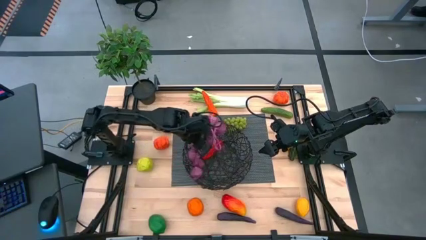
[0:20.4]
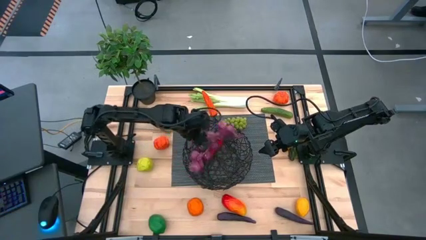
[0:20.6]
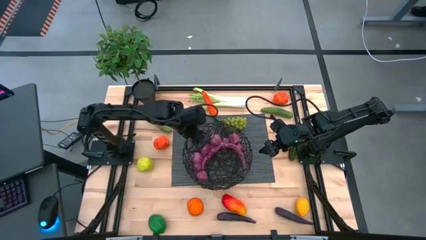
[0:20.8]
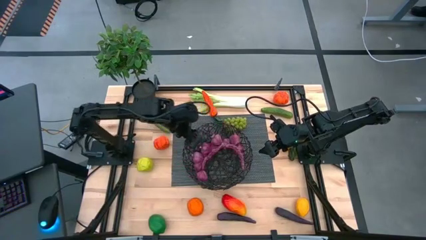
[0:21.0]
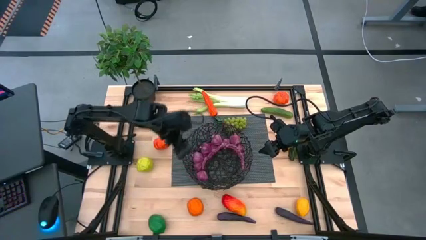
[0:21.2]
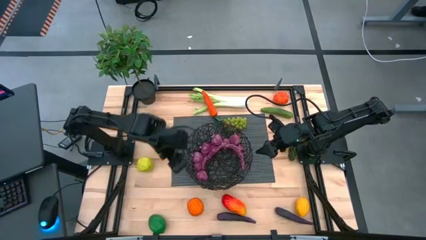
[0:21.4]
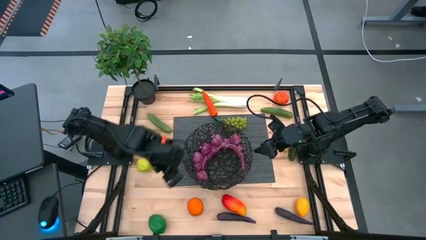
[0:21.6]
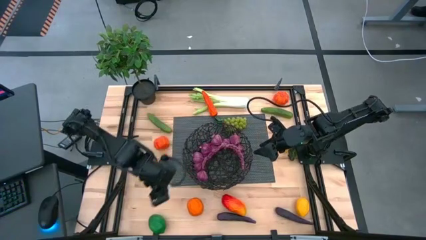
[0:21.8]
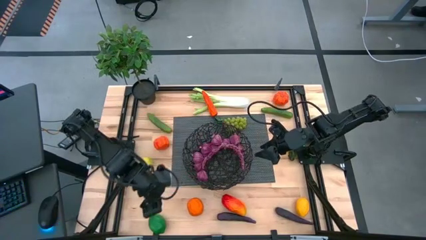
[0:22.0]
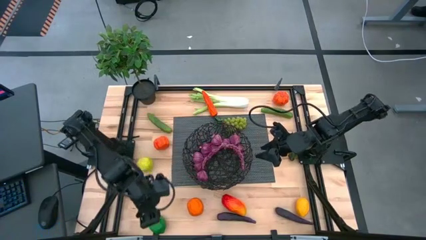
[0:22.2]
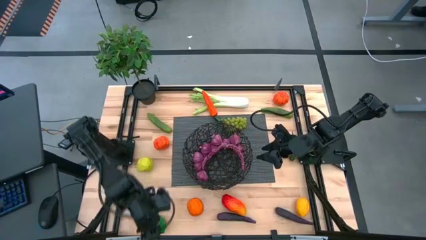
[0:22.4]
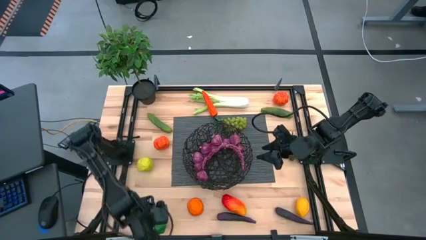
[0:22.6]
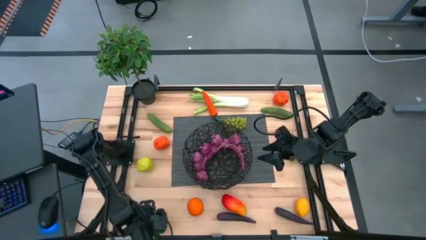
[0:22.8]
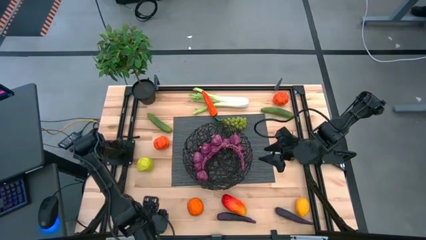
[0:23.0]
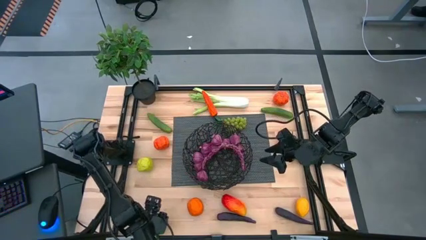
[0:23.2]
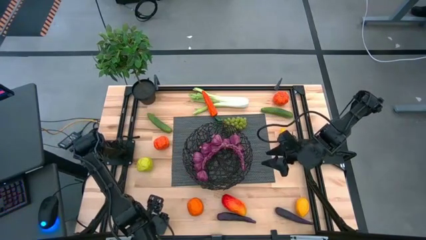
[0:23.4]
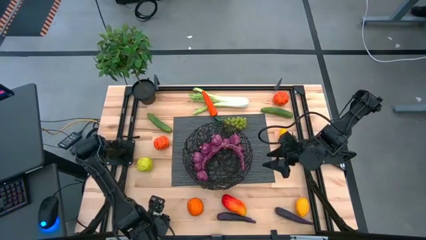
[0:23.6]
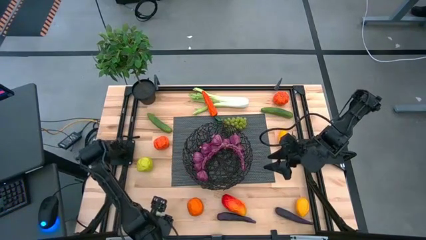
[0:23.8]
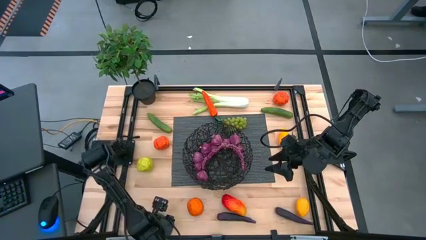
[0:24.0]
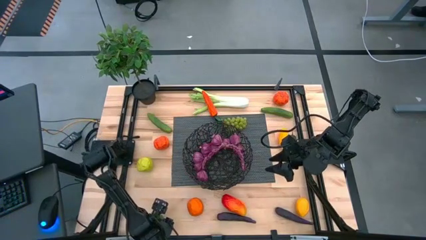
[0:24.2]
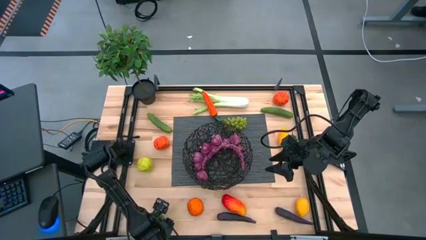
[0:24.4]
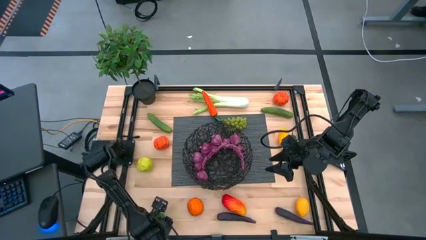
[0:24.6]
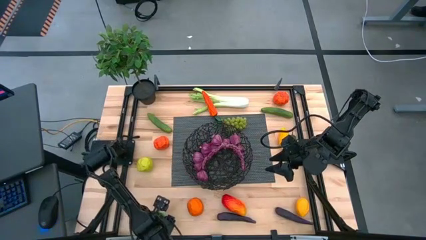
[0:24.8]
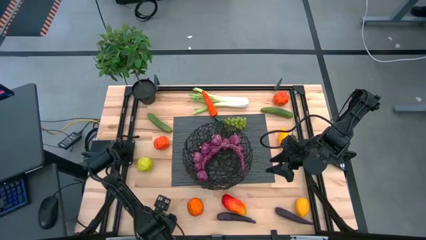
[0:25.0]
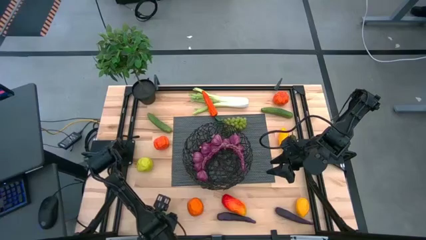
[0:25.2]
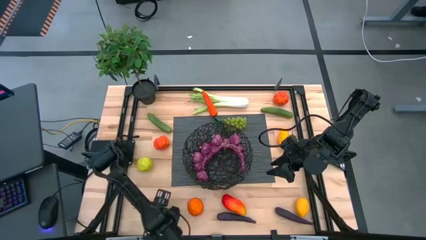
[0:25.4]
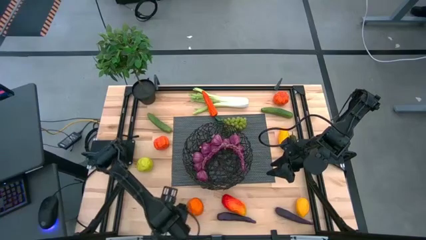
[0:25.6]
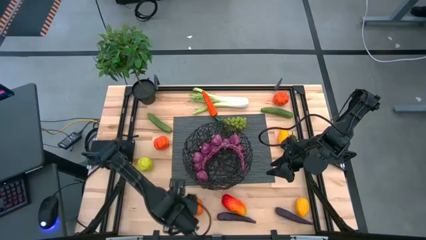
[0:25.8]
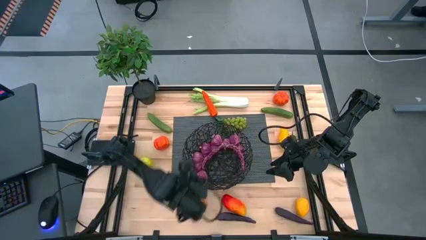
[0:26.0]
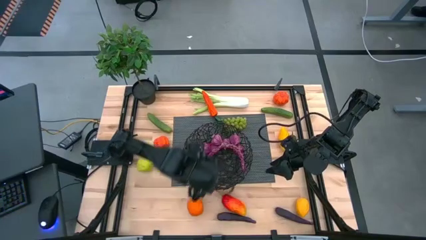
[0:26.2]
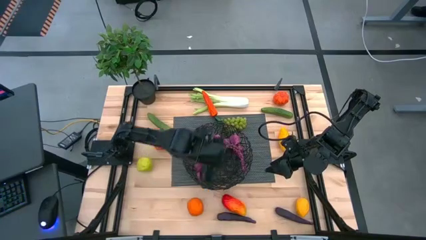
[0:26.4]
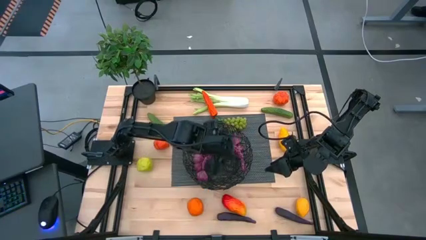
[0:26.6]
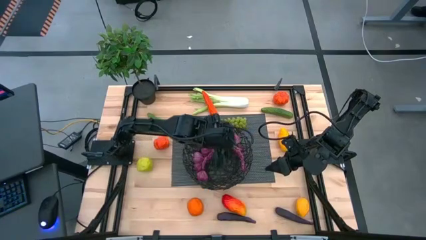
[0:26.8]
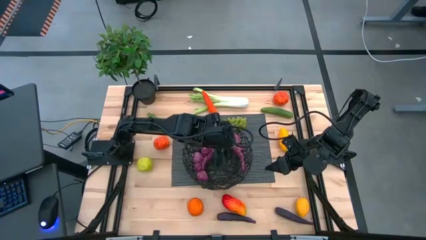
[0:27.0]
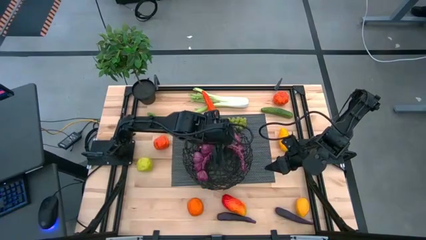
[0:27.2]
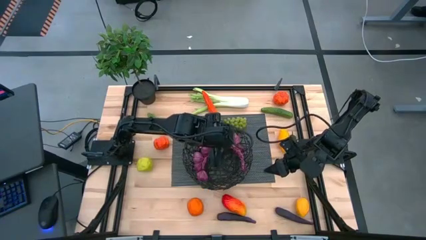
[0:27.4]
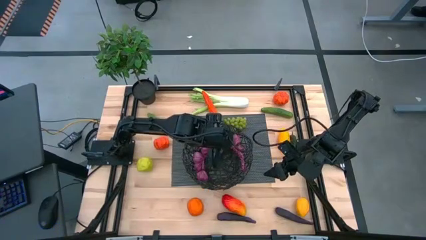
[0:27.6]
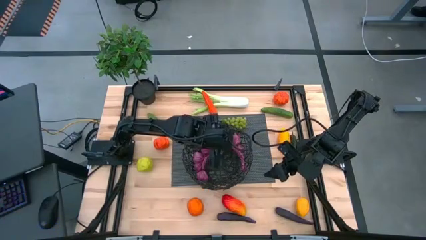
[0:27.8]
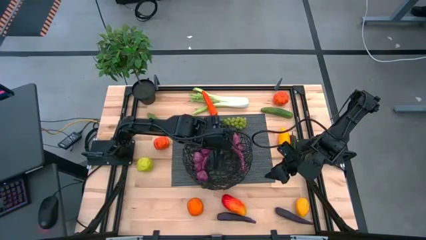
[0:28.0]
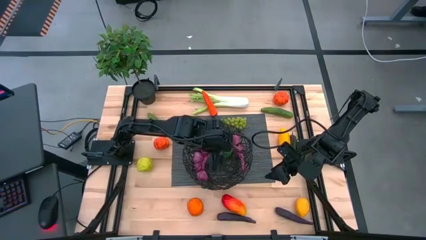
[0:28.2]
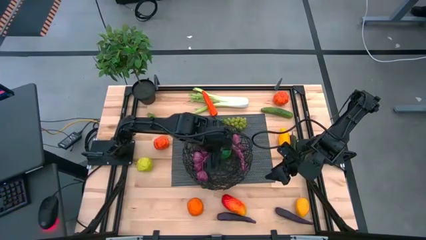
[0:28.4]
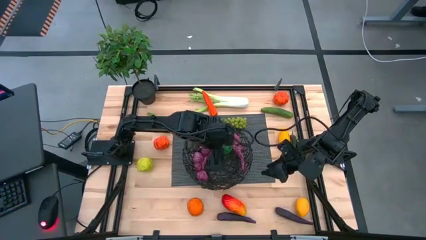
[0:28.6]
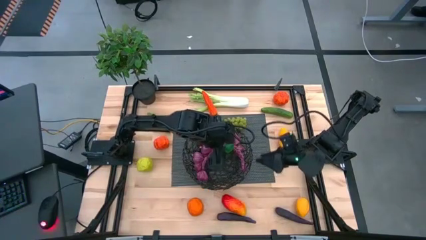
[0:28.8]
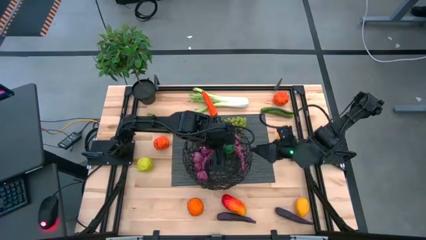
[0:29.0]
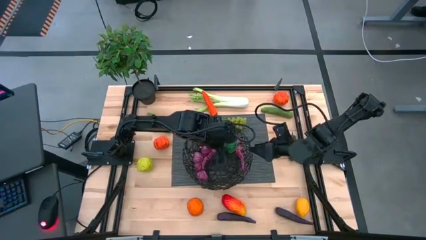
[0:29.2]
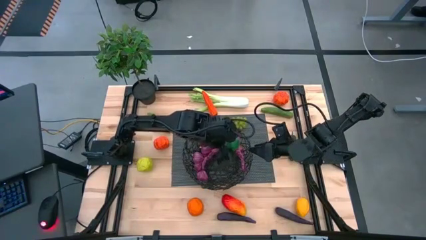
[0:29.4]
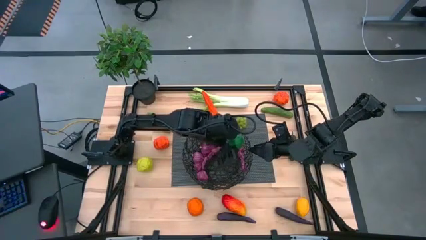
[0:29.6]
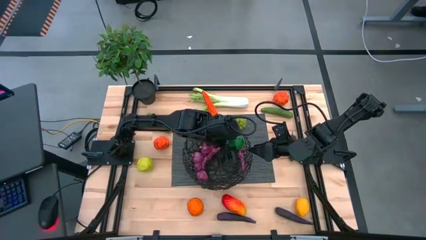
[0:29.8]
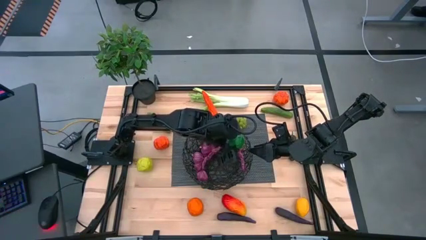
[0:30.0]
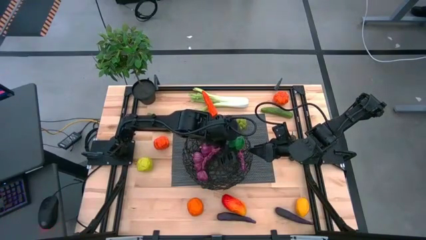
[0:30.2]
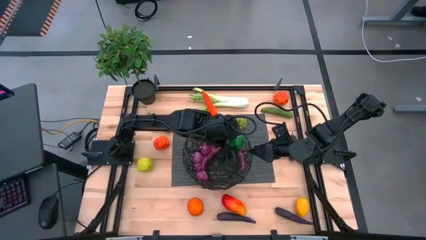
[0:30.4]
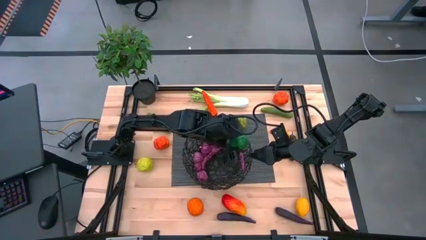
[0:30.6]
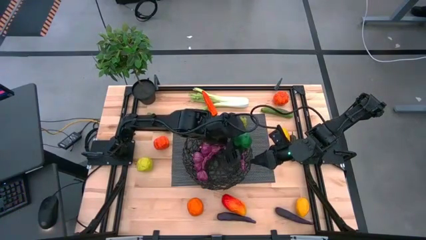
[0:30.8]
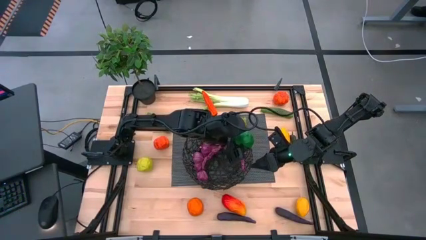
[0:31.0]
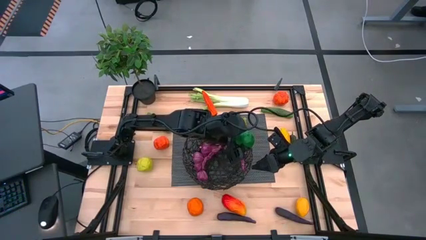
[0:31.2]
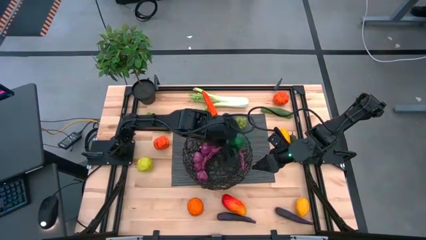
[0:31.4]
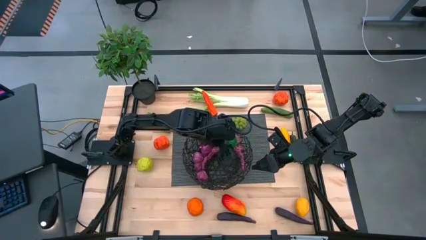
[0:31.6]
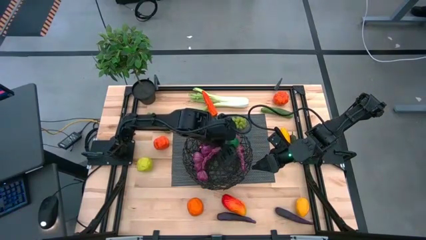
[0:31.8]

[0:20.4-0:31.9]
Task: Build produce basket
Put the green lime into the black wire basket

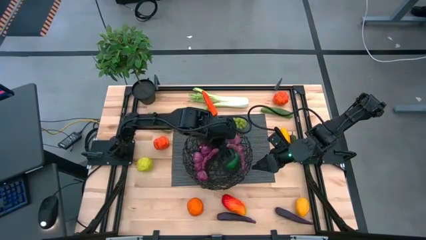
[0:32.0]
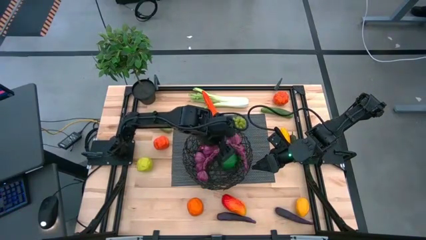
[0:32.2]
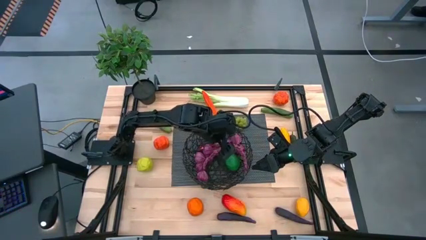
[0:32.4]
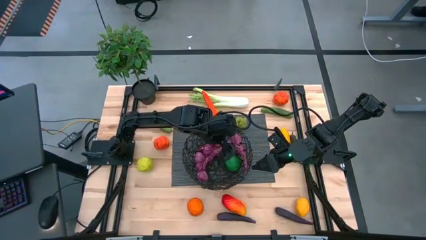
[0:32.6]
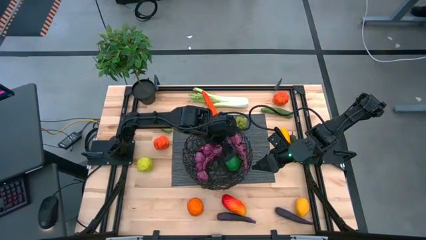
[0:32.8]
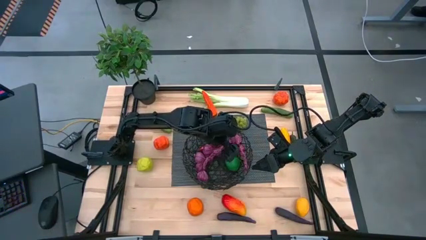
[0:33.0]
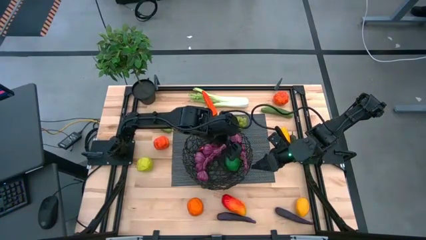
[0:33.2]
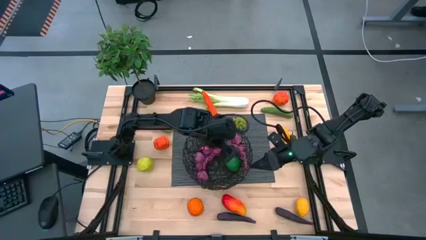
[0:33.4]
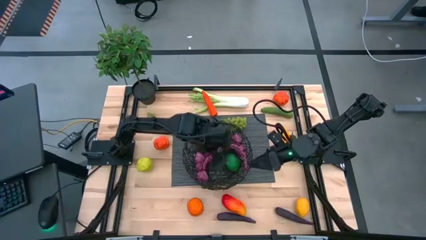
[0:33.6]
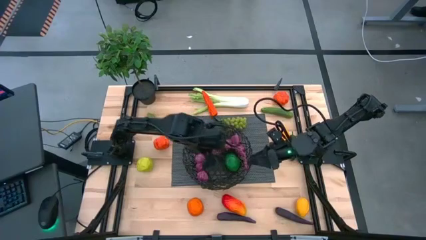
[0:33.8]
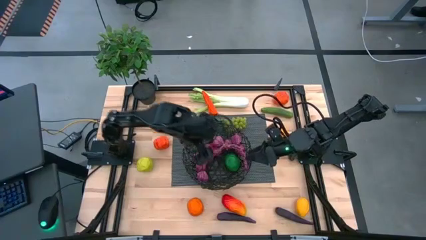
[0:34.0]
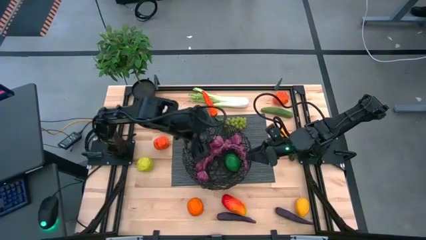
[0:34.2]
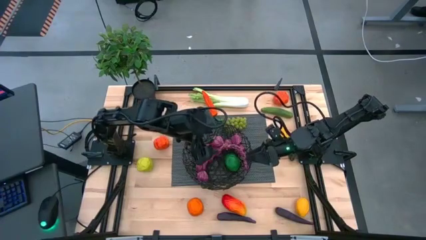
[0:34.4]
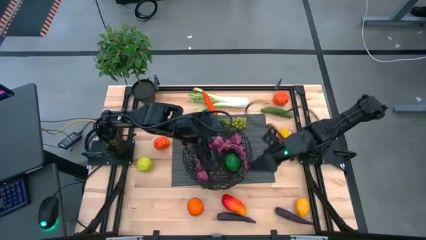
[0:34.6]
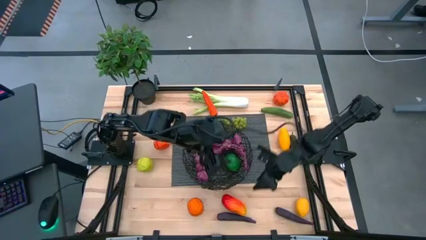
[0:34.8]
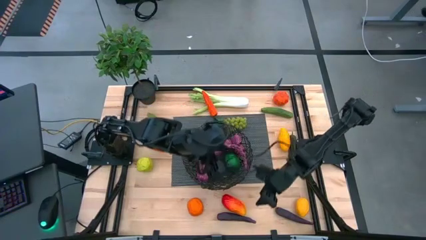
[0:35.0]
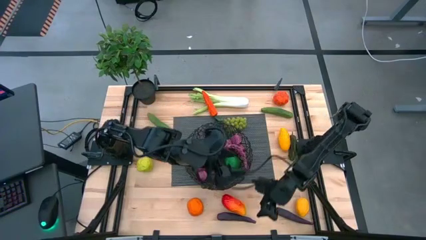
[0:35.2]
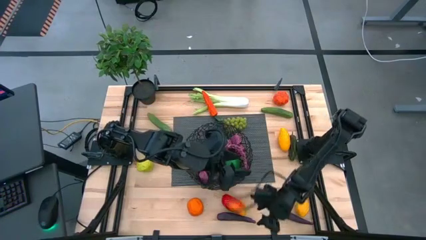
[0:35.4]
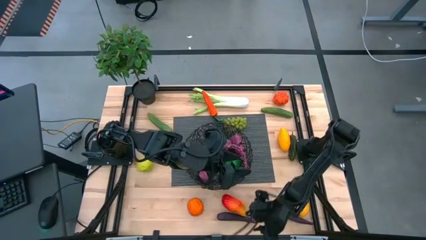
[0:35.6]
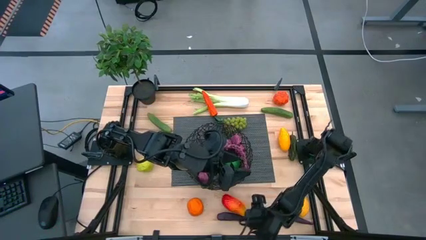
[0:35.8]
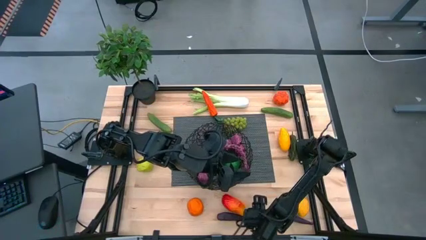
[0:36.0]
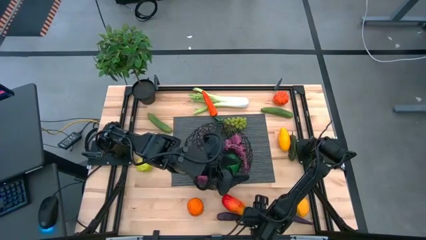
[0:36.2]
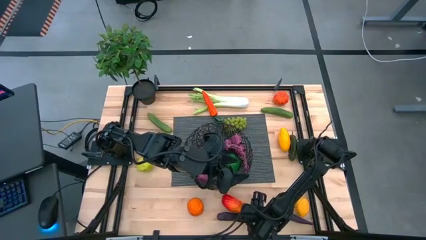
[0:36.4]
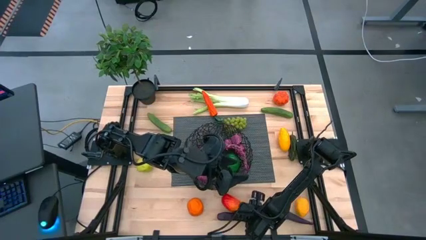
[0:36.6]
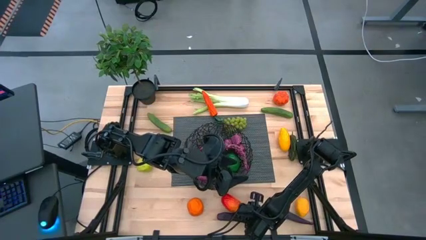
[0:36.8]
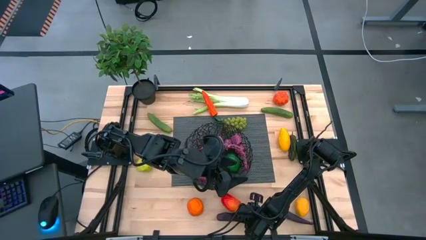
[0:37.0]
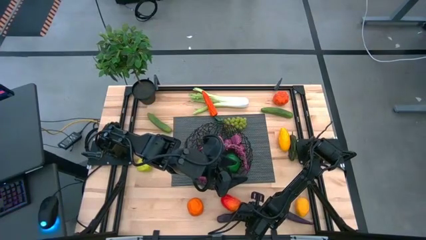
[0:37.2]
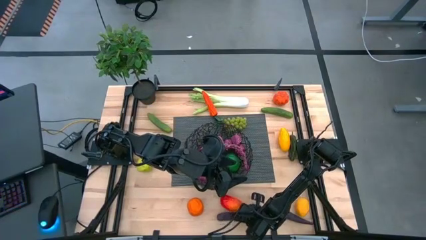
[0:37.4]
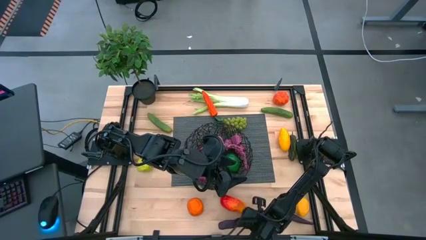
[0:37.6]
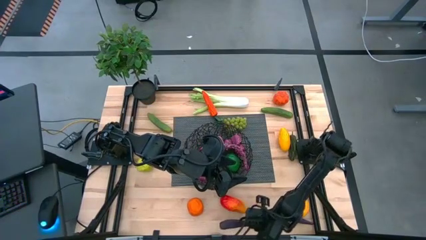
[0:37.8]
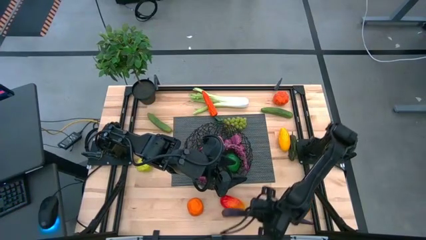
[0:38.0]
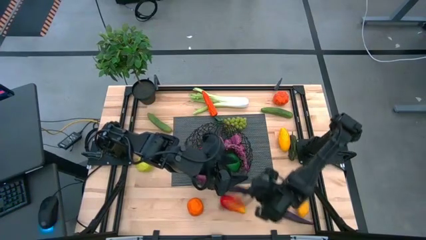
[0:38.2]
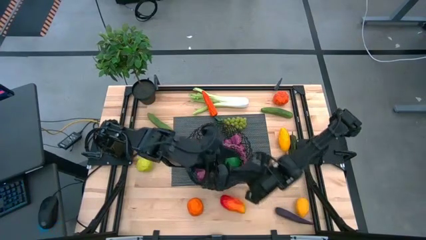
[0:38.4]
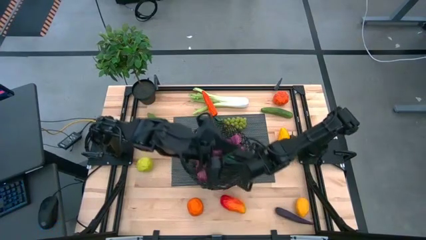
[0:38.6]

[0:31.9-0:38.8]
Put the left purple eggplant into the black wire basket
